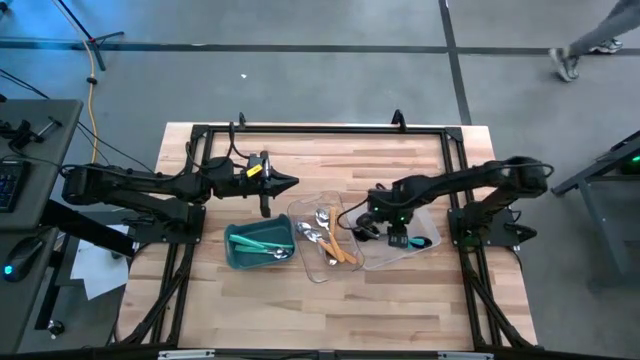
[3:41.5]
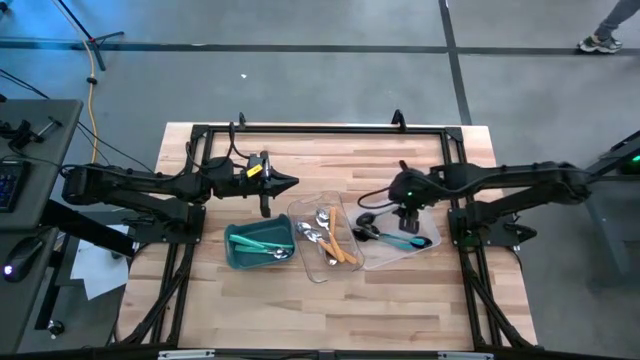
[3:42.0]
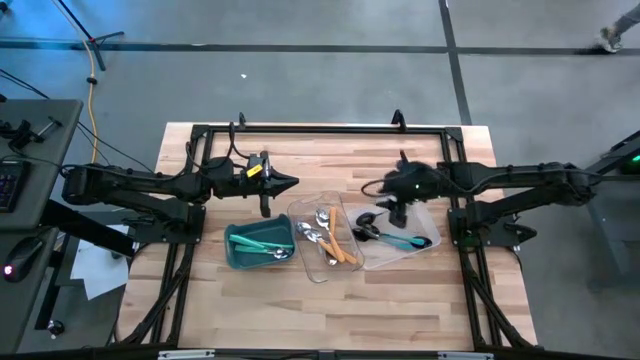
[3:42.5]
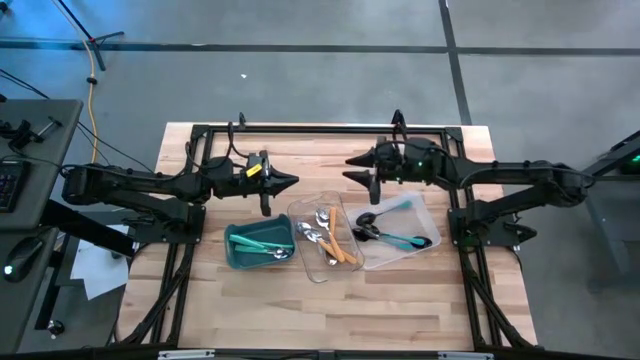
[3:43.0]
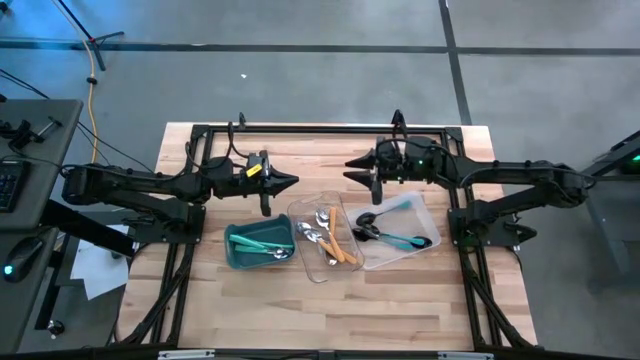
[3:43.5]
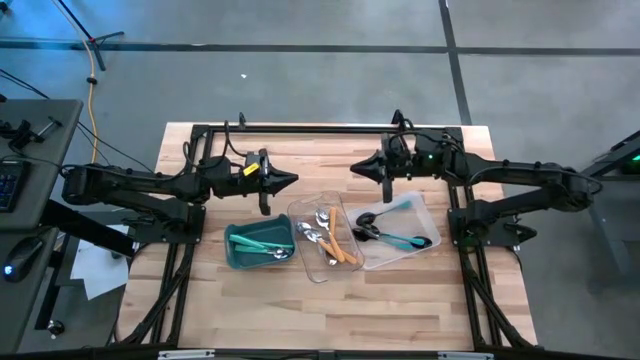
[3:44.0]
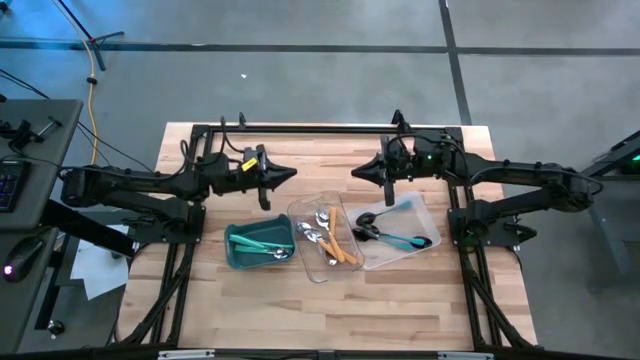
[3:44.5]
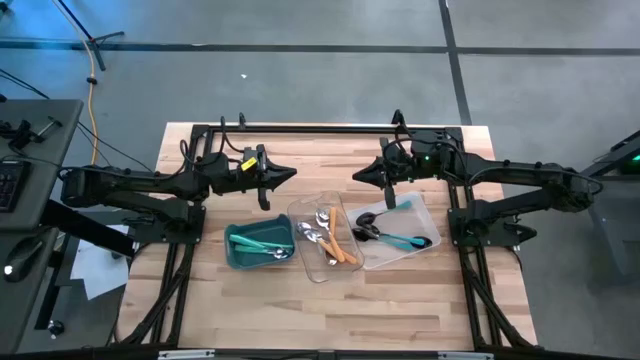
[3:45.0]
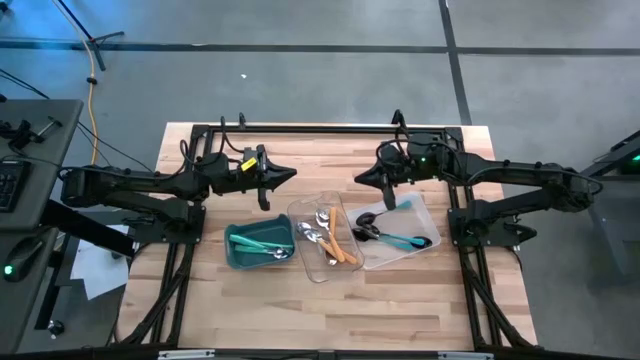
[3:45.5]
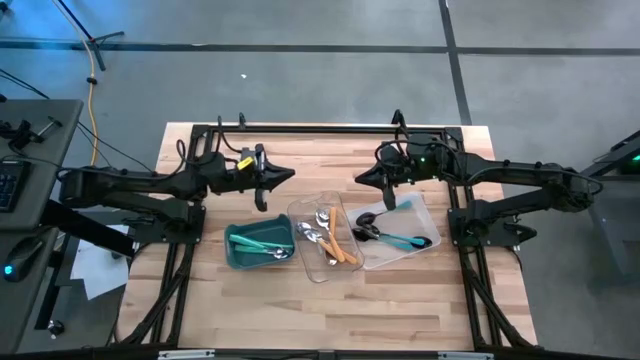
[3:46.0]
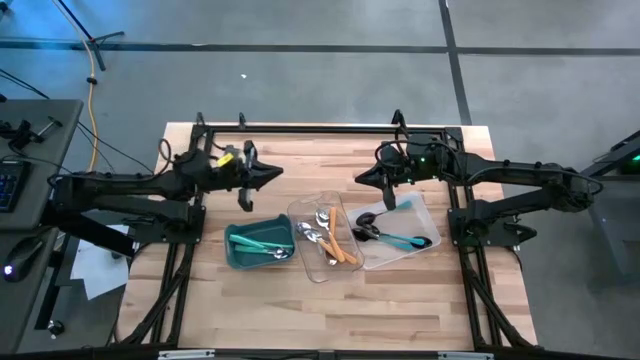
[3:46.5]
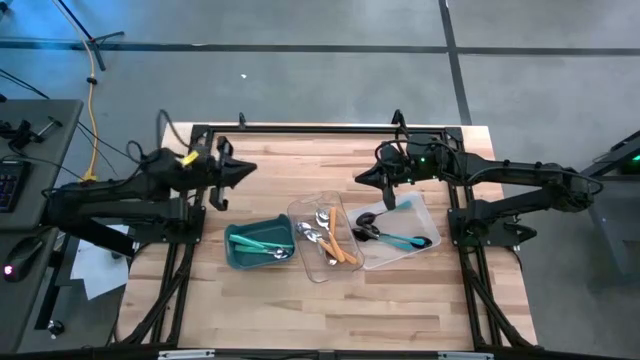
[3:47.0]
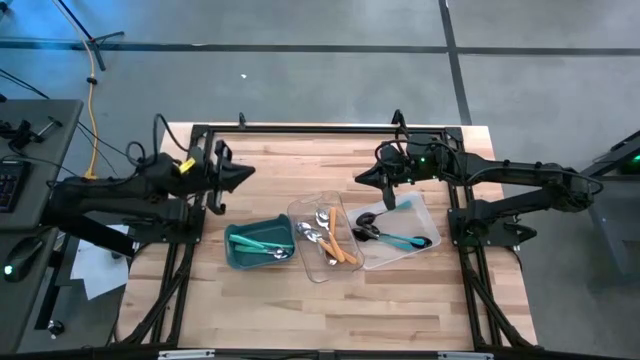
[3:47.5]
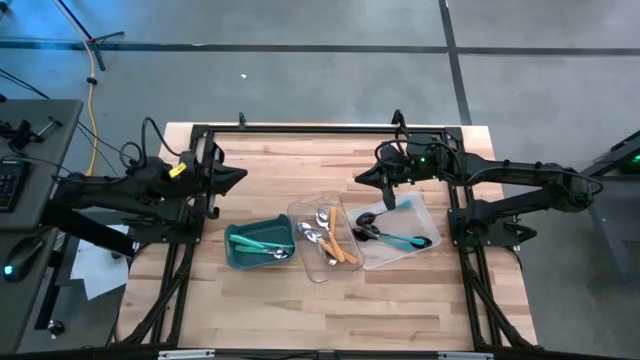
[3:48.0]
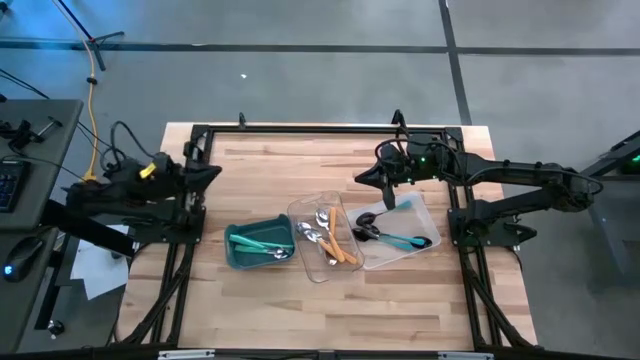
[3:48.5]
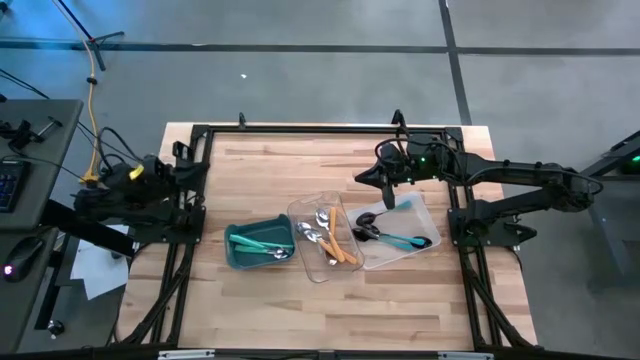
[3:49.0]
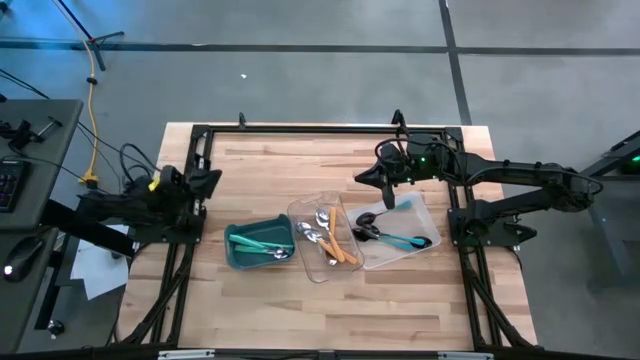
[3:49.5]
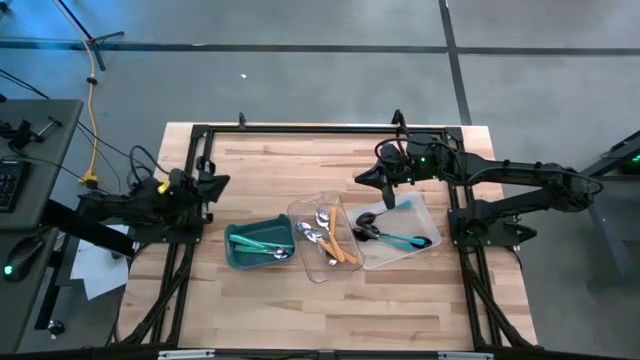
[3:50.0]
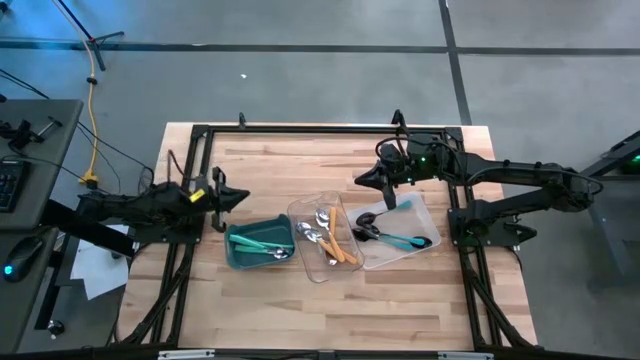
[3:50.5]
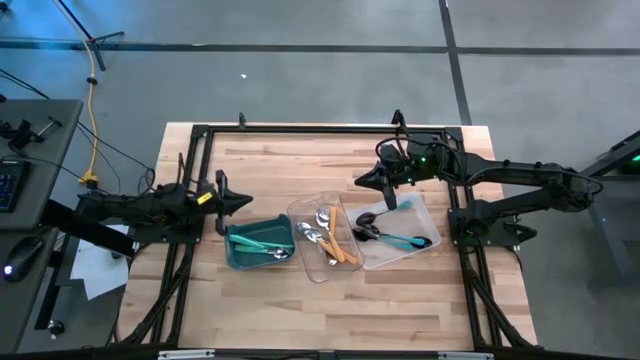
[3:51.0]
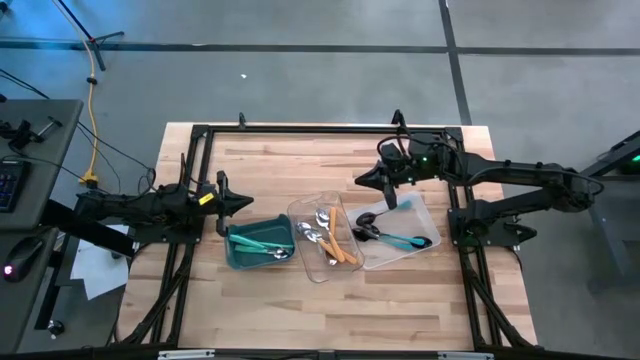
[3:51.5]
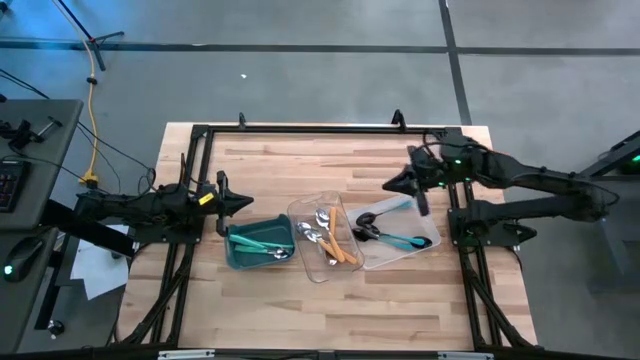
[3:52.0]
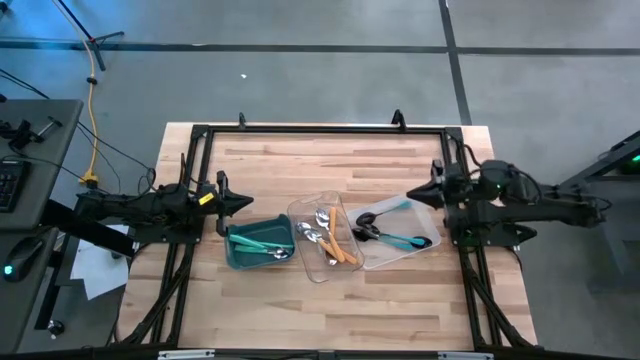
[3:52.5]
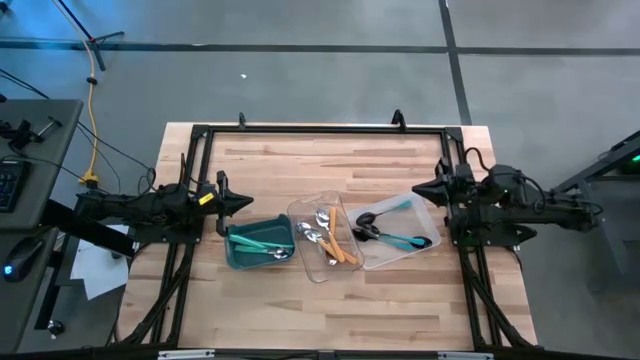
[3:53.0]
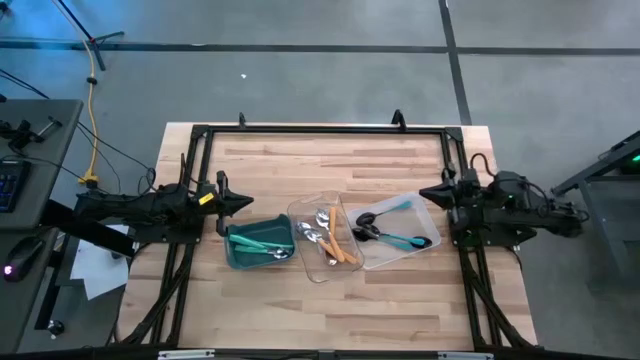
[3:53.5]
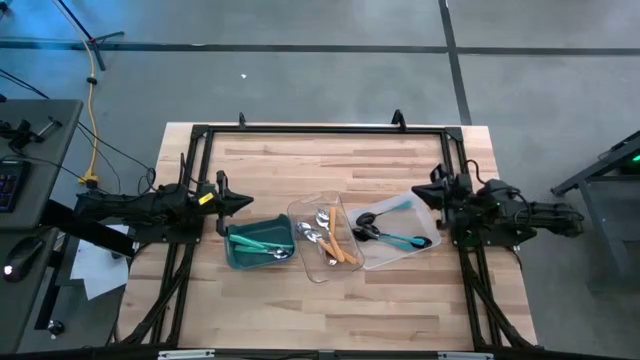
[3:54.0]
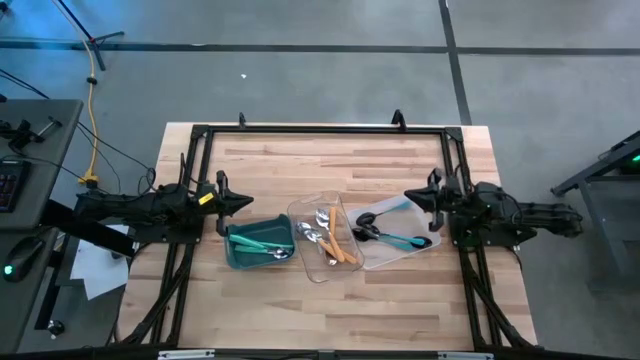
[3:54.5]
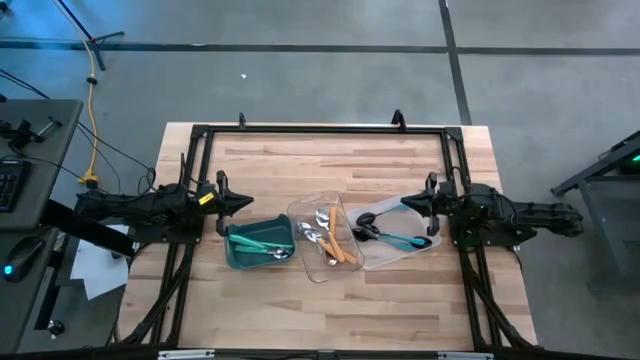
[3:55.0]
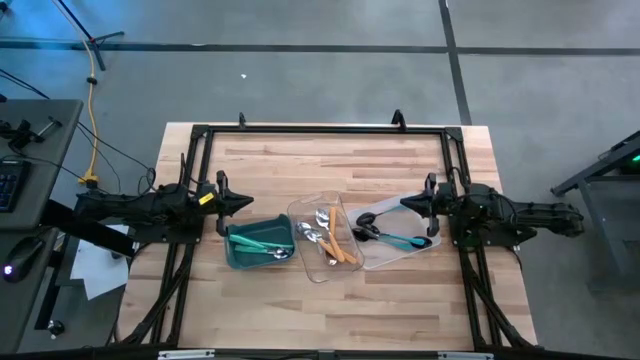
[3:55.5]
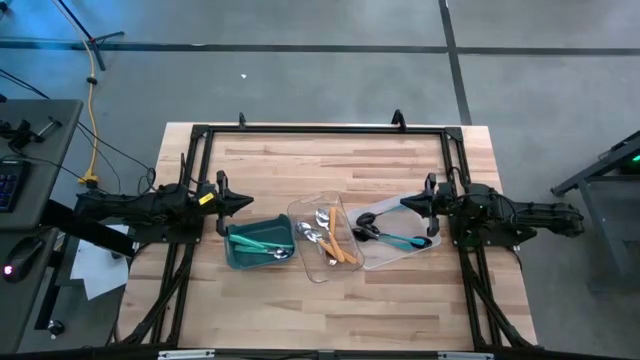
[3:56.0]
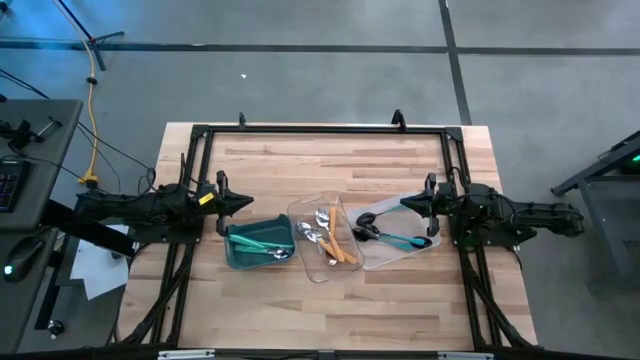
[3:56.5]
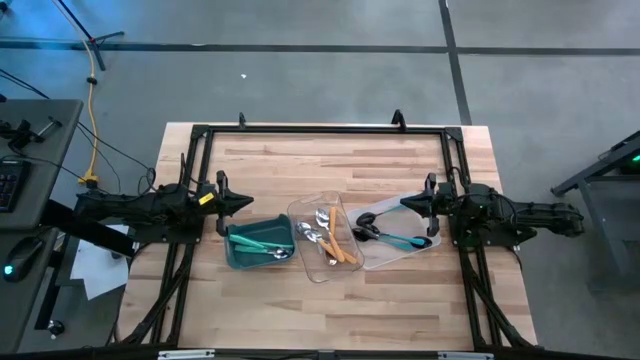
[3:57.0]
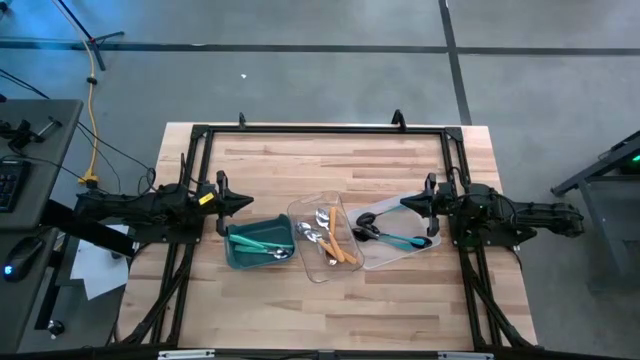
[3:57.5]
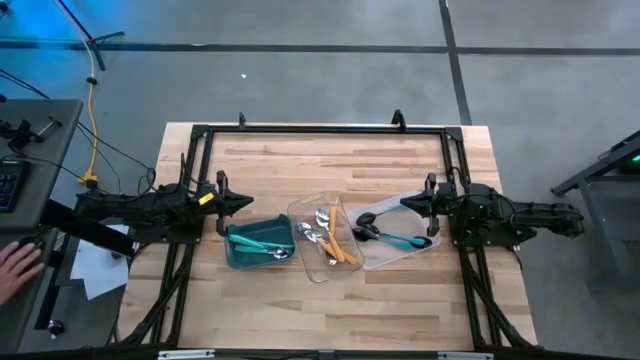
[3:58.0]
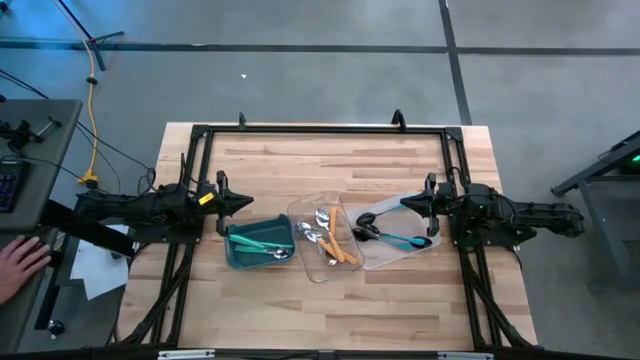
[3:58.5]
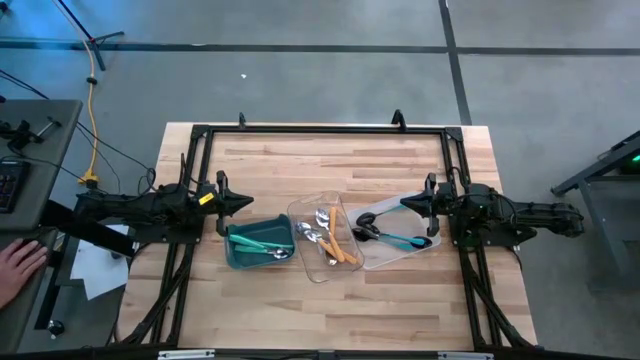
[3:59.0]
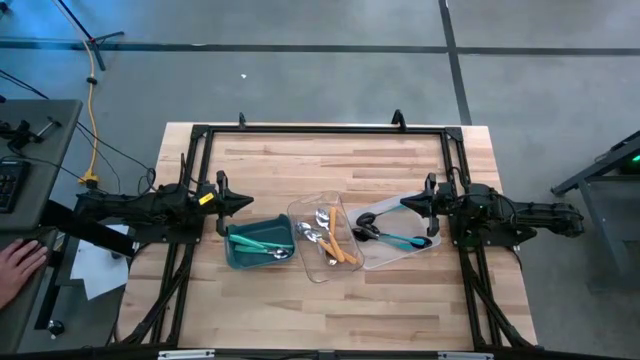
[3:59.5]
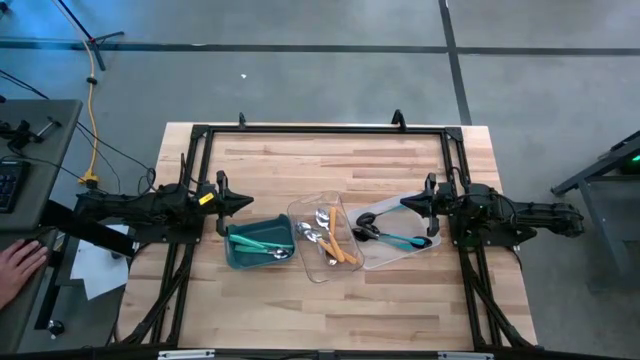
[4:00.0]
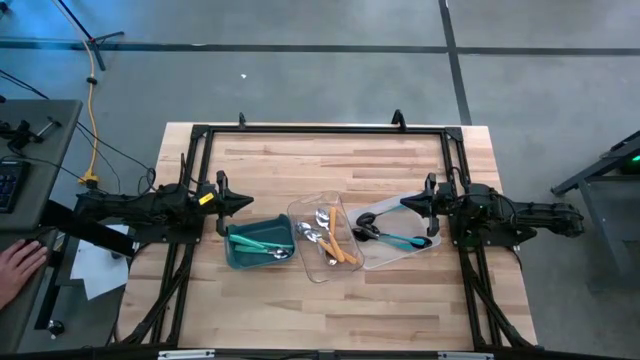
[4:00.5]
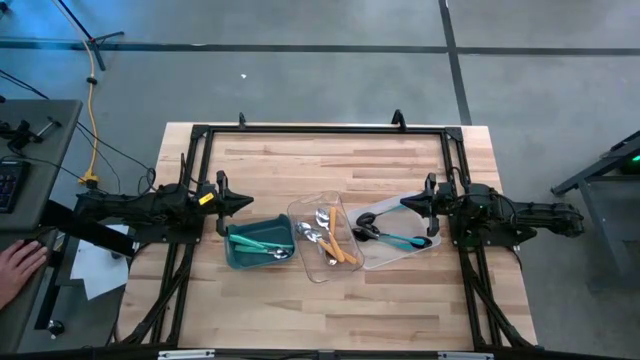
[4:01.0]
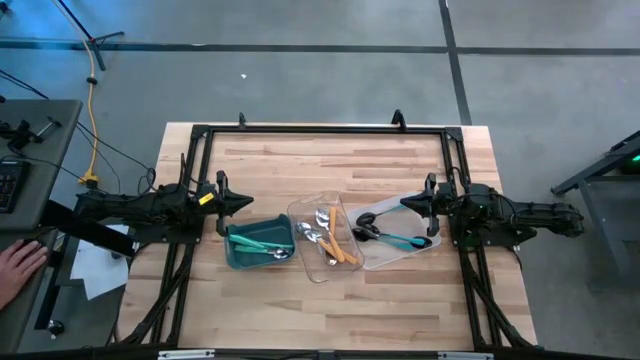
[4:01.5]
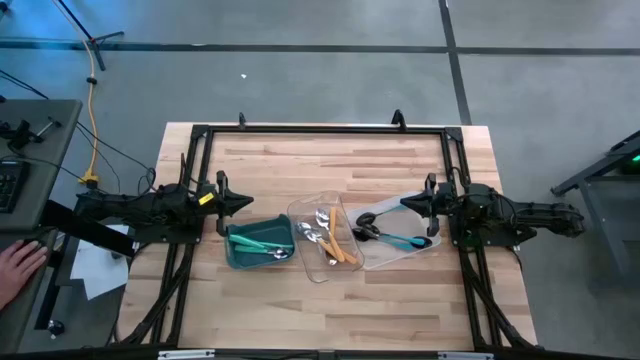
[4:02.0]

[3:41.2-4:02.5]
Task: Sort silverware by color (type)
Return to Home Position
